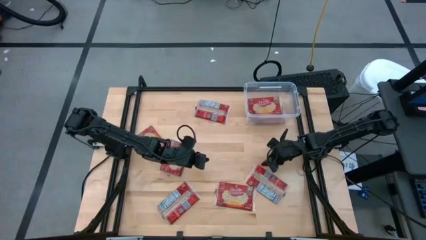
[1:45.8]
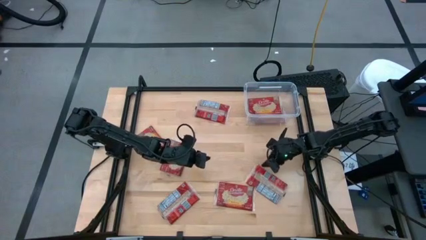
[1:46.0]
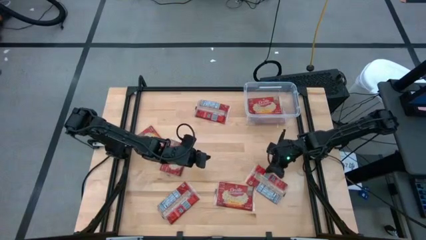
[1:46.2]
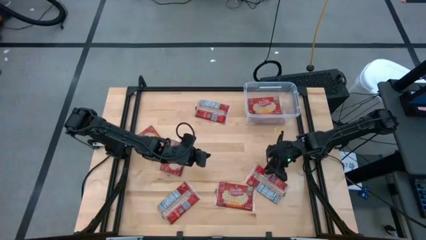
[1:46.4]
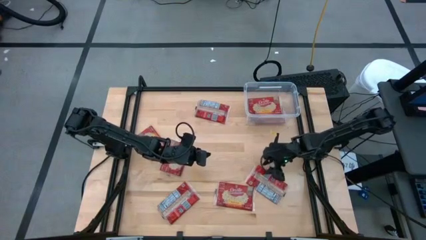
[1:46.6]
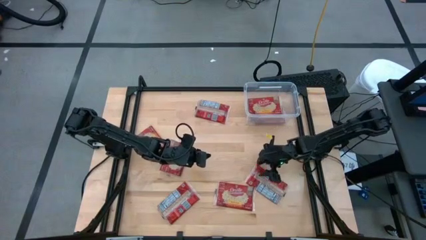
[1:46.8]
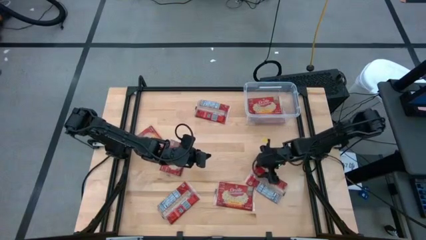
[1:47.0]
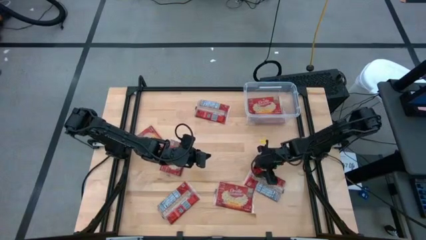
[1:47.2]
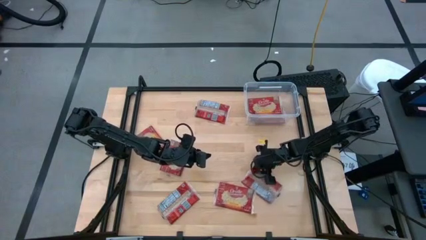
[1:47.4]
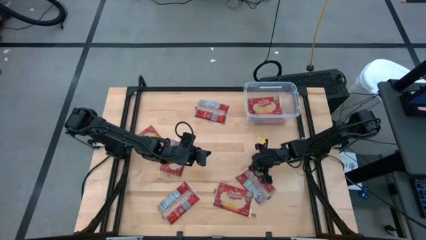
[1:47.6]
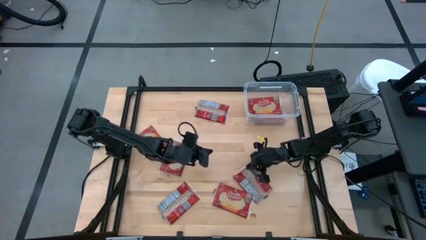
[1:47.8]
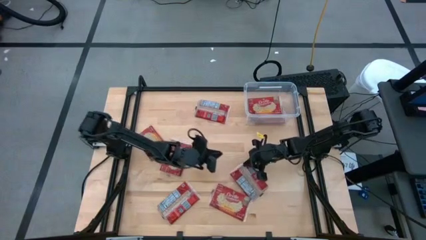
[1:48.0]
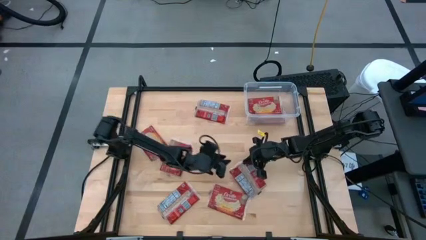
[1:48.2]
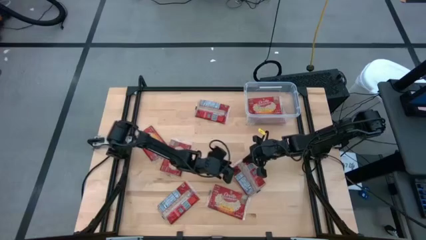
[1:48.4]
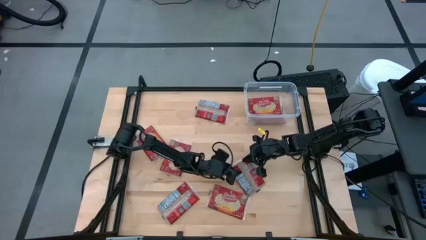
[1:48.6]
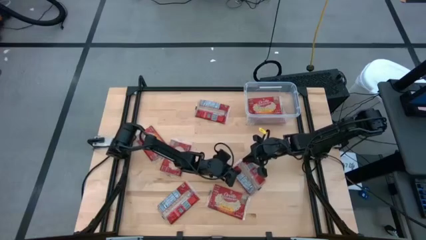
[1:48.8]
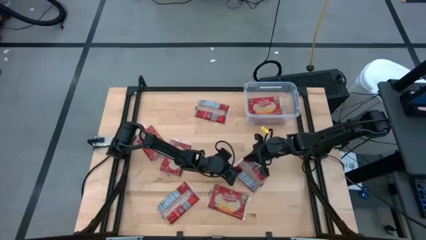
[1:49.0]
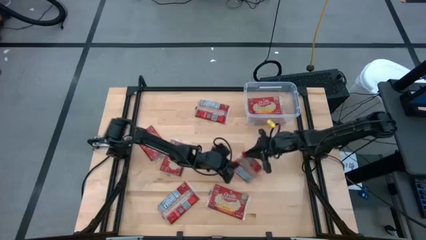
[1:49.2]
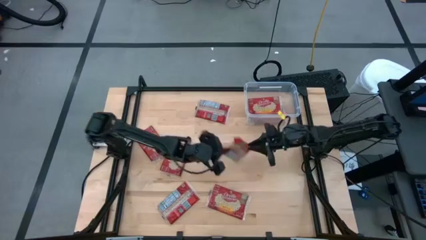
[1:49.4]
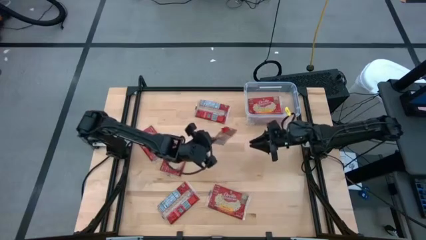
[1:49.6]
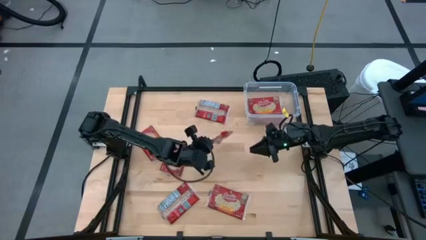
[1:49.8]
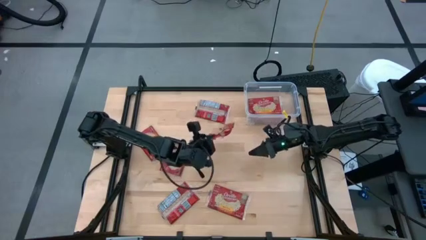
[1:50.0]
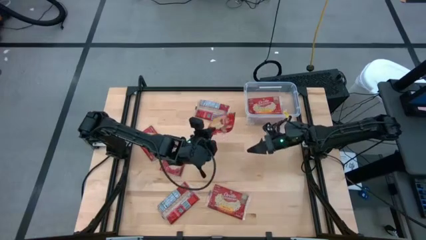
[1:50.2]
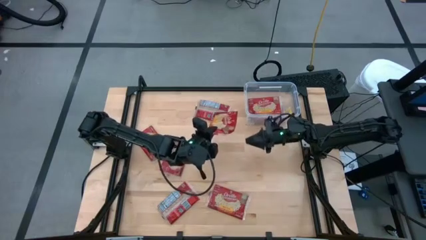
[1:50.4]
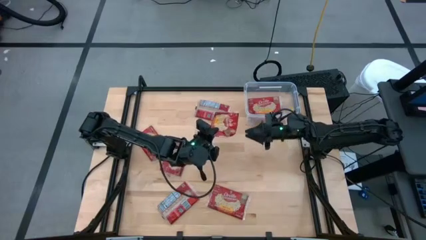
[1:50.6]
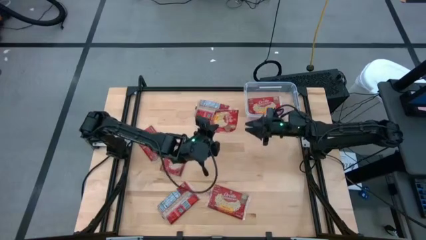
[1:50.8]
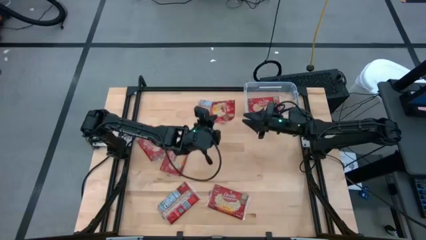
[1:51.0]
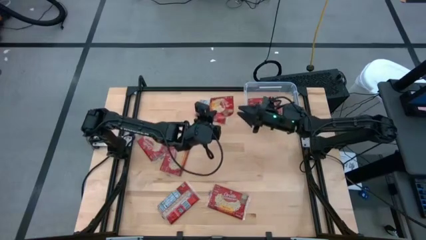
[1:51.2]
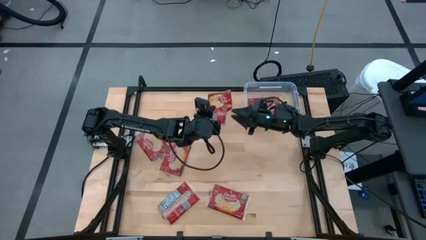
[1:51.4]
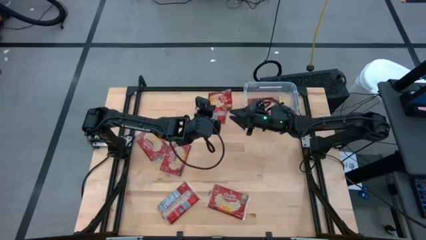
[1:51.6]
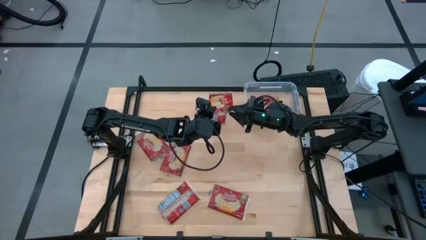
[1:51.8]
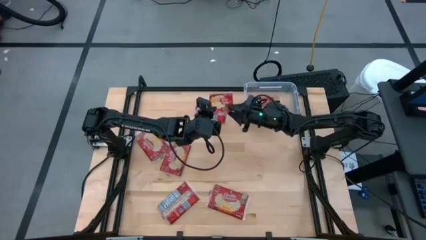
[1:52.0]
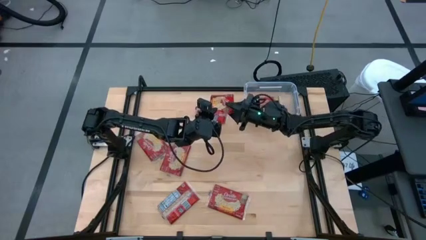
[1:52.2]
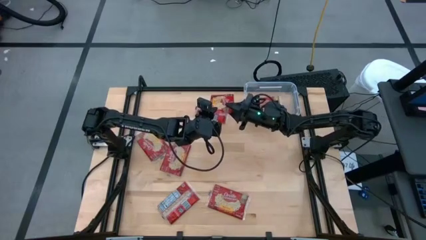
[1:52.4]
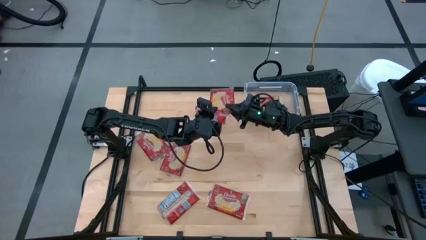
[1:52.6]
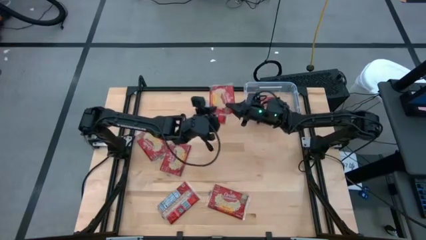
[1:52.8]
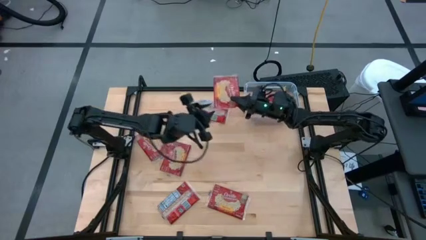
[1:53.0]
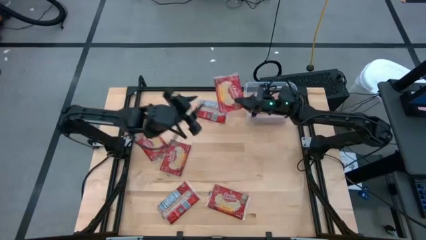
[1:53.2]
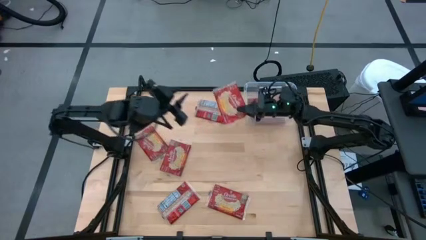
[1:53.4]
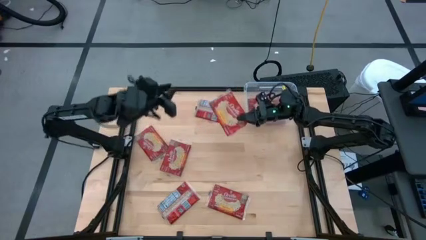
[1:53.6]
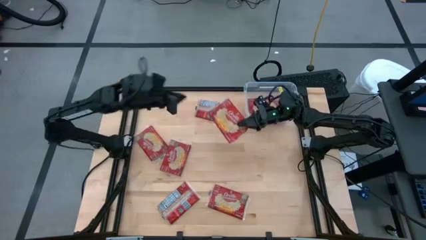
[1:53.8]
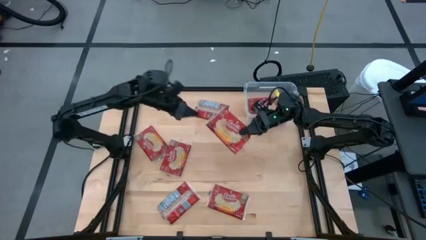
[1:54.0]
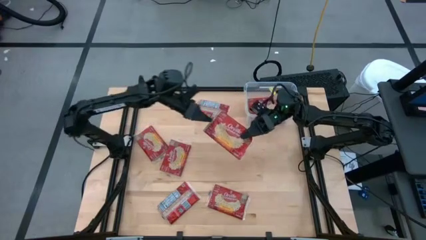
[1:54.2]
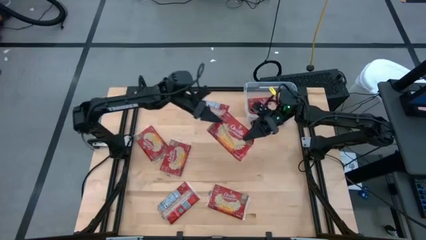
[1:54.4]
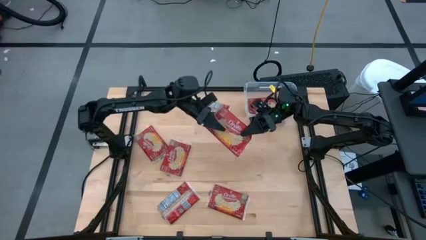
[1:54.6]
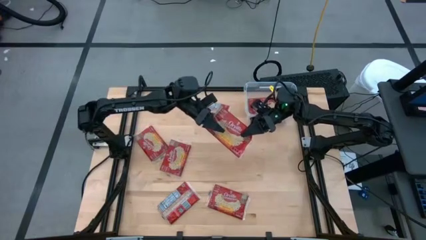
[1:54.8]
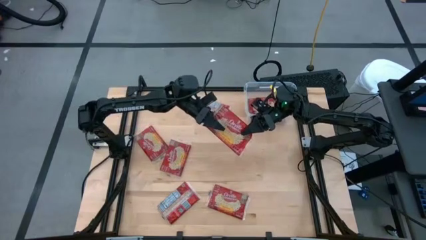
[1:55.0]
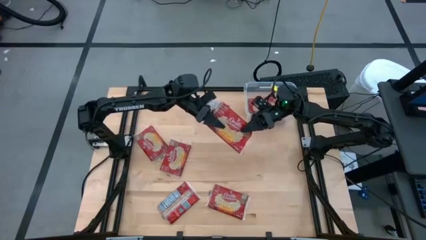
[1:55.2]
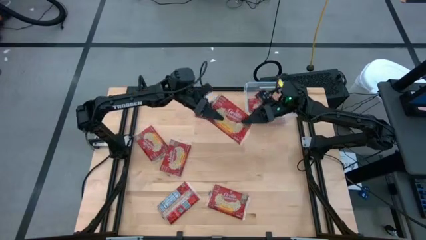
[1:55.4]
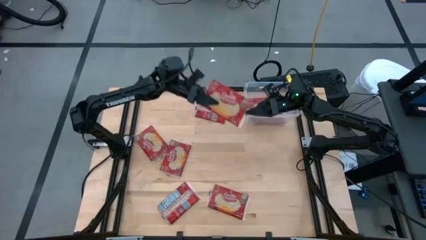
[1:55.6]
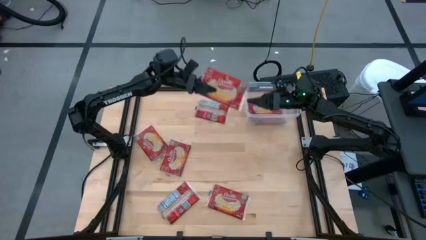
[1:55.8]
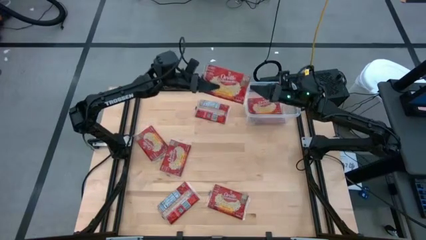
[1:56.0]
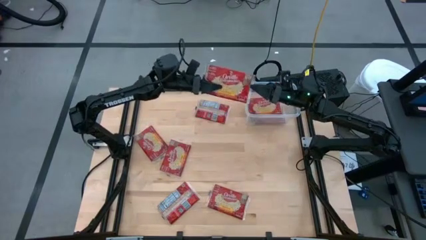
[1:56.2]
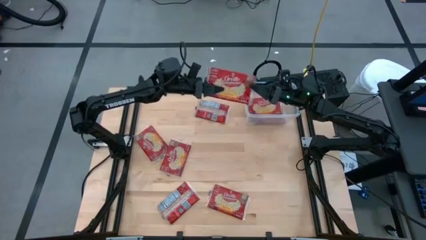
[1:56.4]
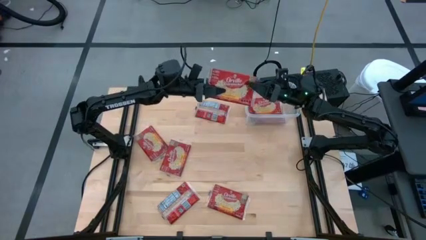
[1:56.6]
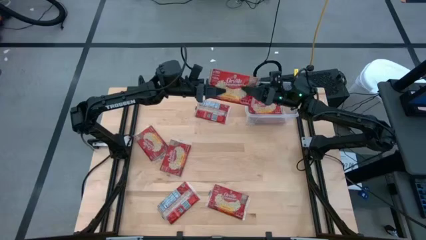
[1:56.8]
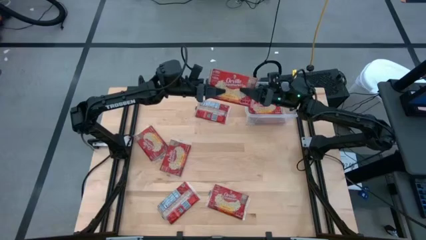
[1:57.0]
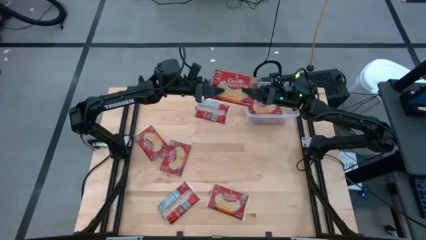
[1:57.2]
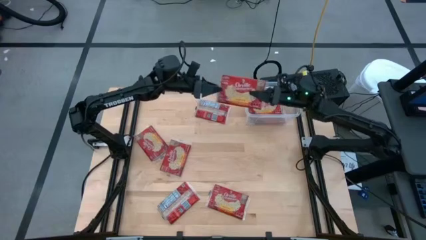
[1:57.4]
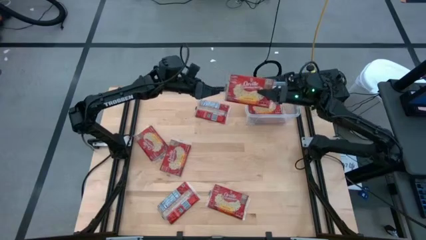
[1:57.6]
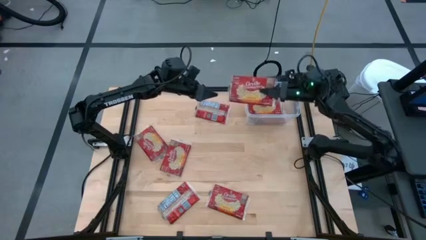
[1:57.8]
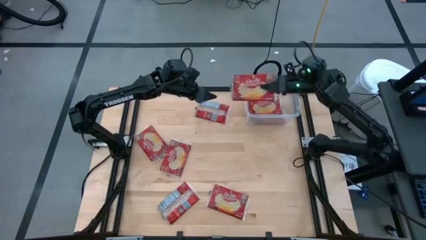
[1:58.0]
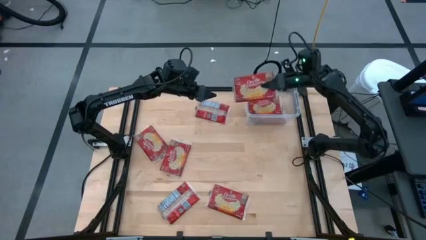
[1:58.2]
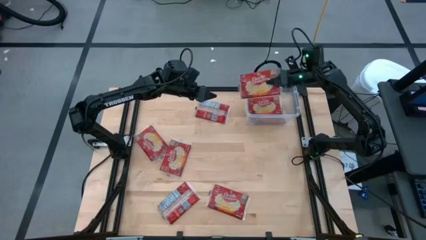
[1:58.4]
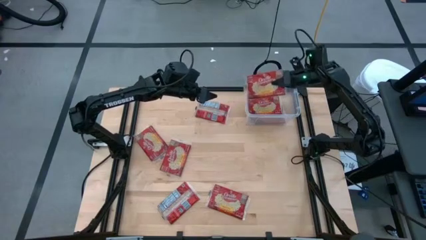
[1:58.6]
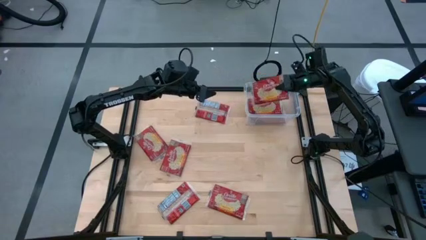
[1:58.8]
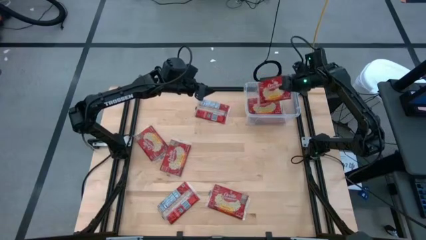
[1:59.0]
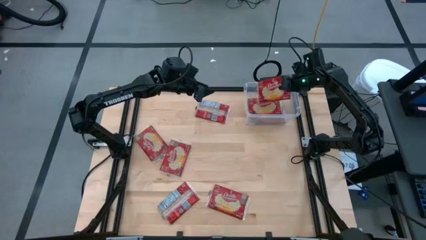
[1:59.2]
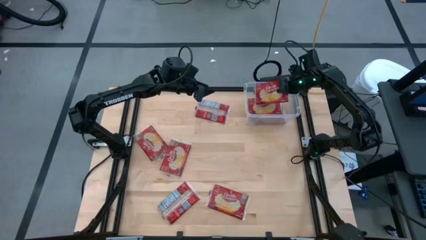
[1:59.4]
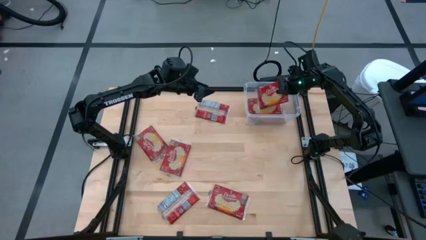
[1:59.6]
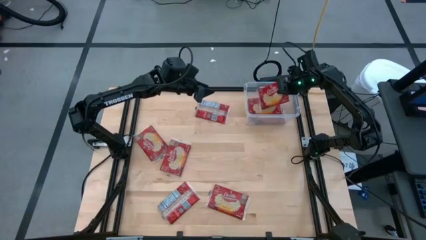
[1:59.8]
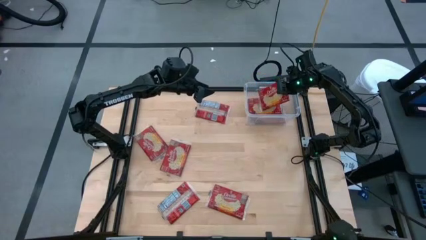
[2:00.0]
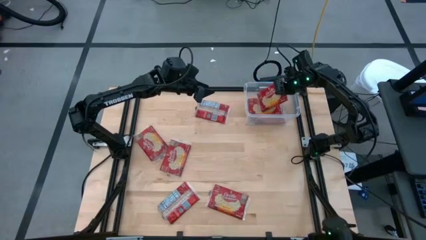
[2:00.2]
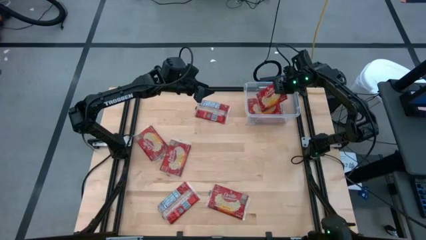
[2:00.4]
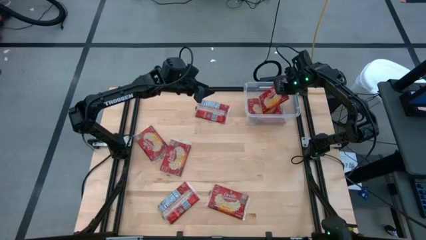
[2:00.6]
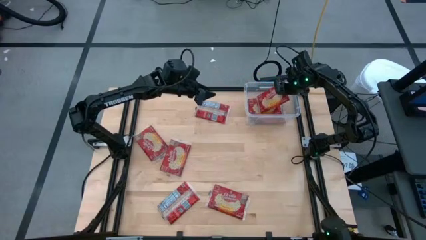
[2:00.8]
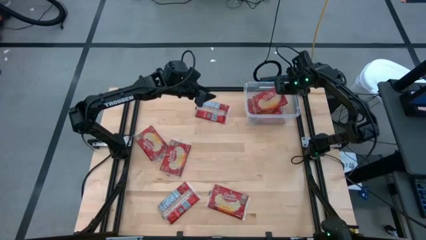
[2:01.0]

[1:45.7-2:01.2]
Task: Sort popcorn bags into baskets
Put the popcorn bag into the transparent container
